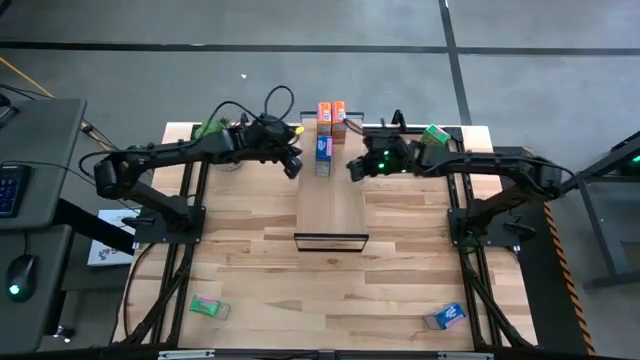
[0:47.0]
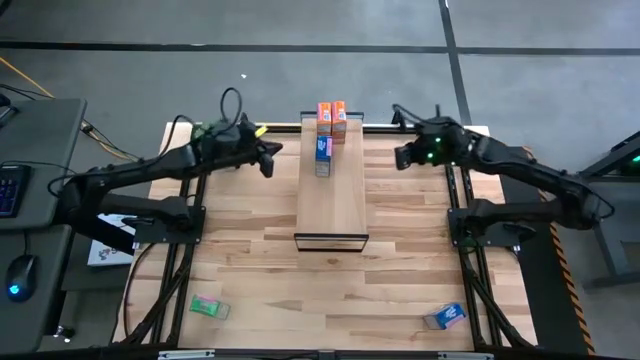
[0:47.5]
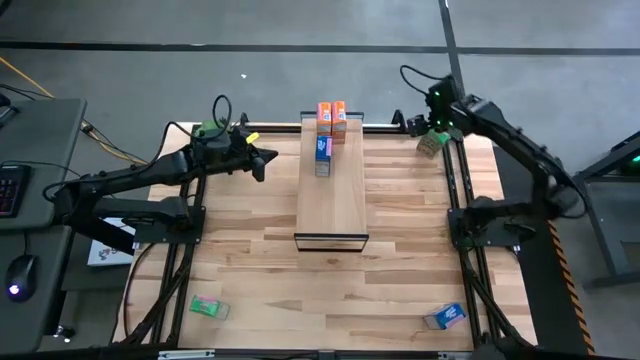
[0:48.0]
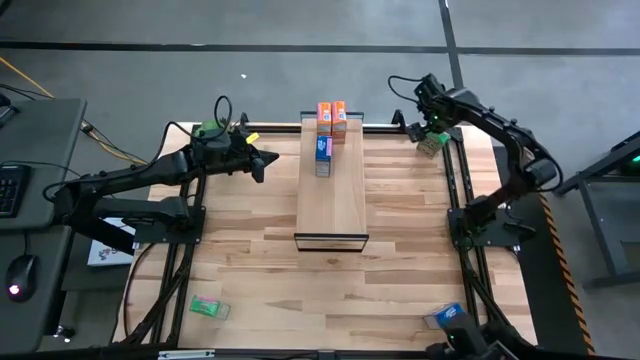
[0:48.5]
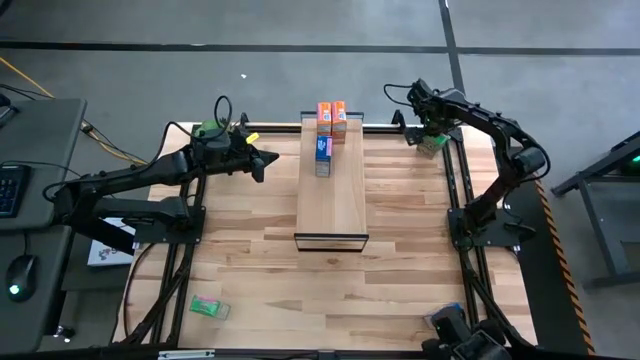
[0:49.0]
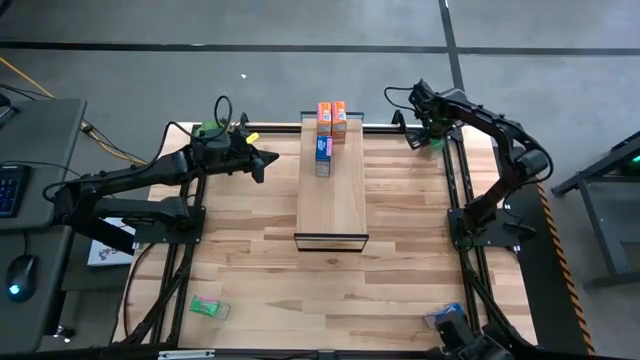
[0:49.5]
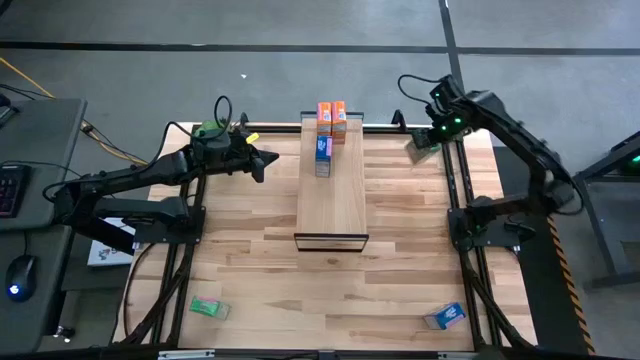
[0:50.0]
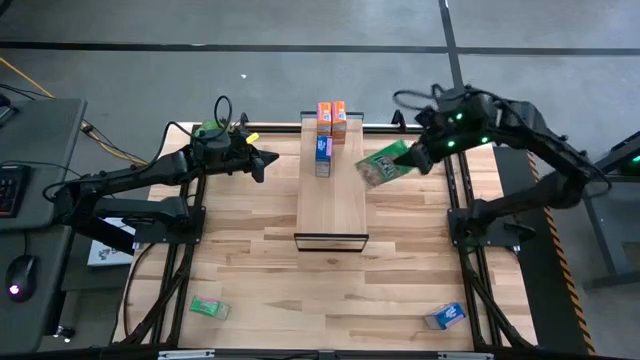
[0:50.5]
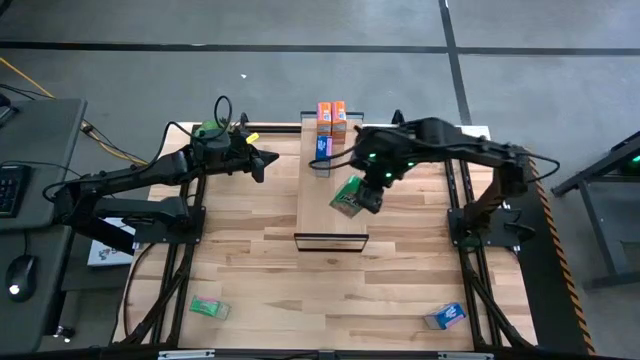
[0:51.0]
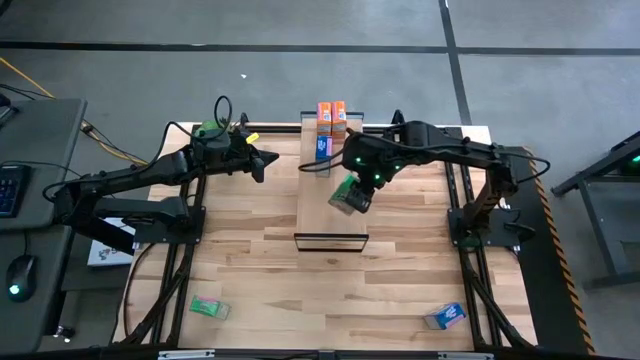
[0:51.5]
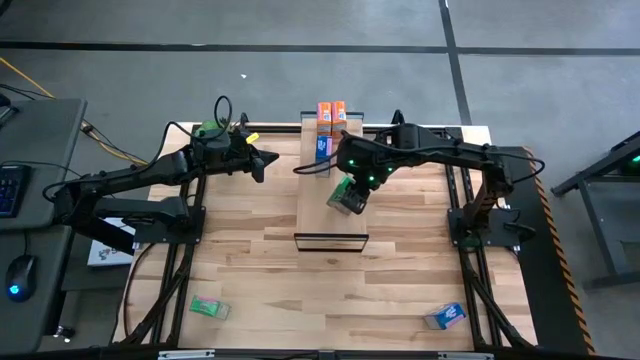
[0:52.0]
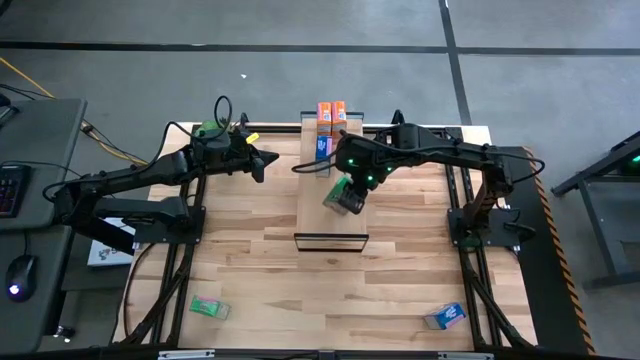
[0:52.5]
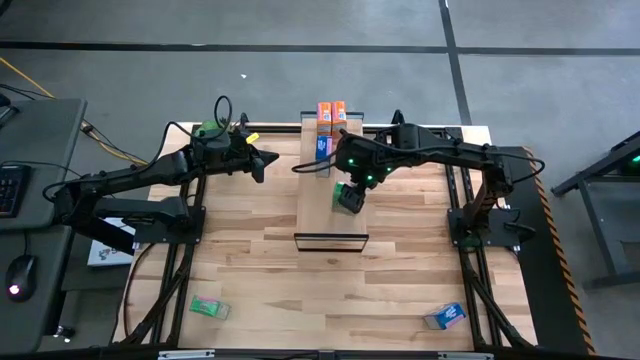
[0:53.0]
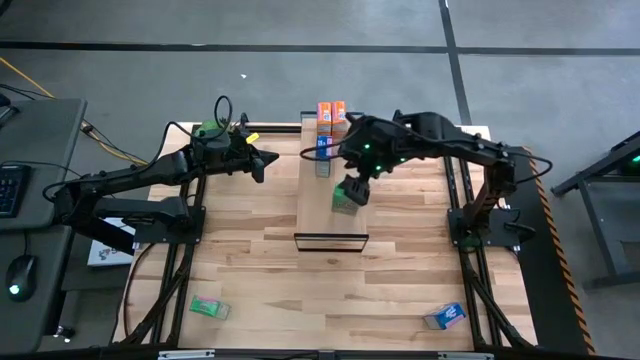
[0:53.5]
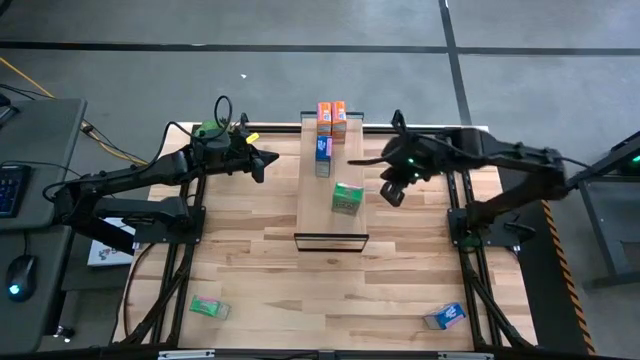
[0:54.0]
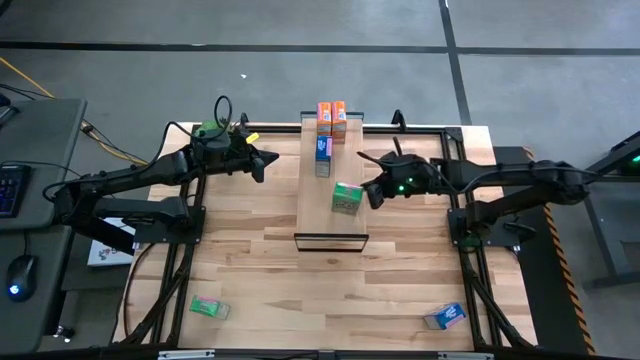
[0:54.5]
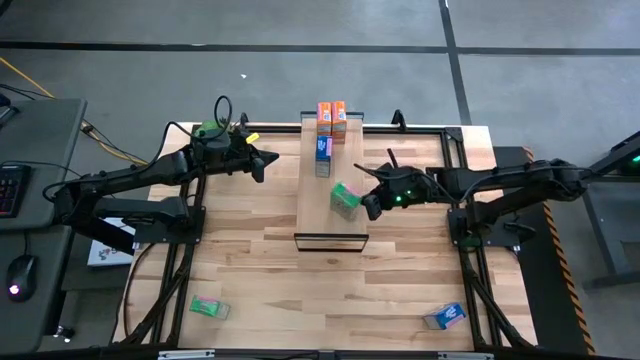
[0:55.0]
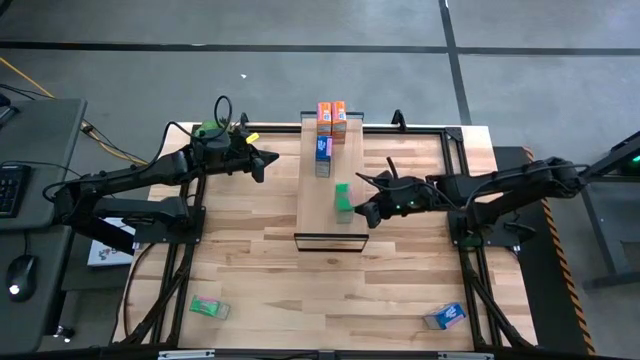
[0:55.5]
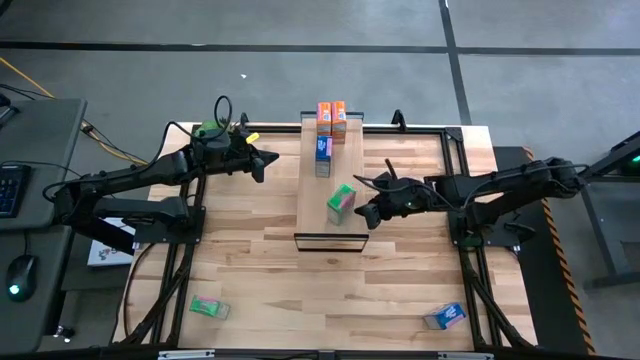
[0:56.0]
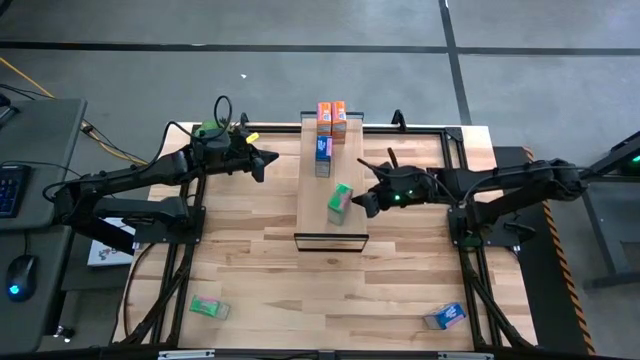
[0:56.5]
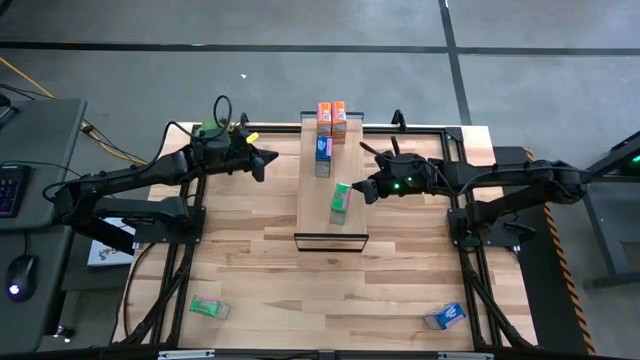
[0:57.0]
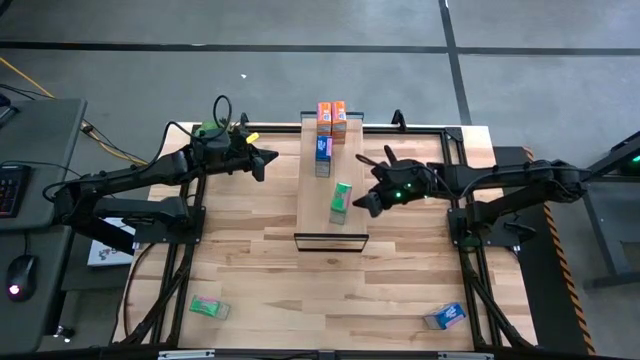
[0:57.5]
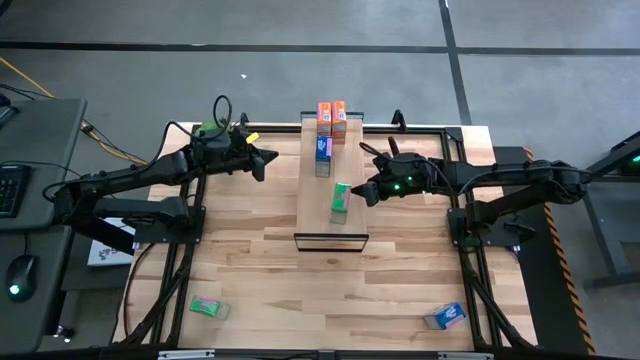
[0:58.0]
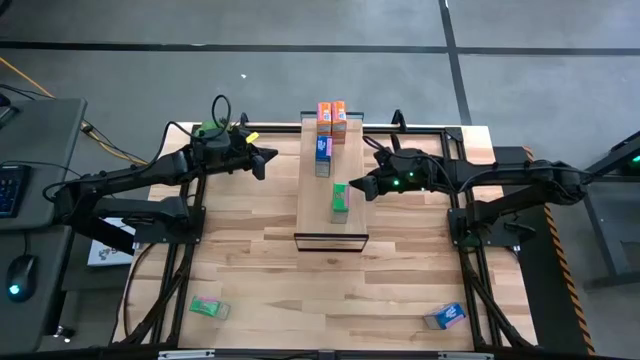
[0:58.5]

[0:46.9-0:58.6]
Task: Stack cereal on shelf
Put the top green cereal box on the shelf

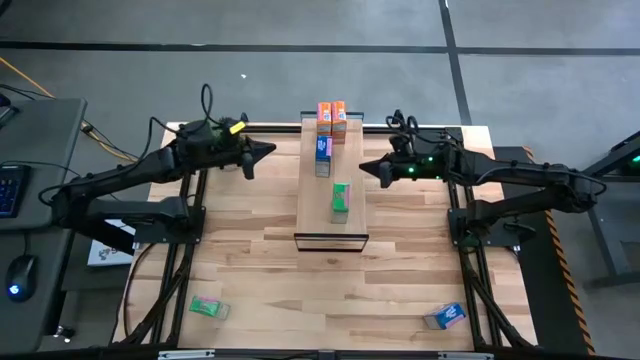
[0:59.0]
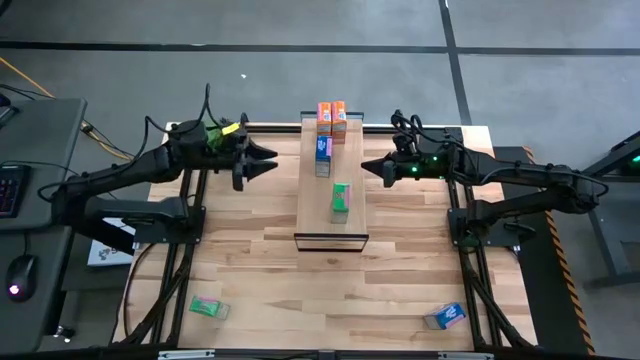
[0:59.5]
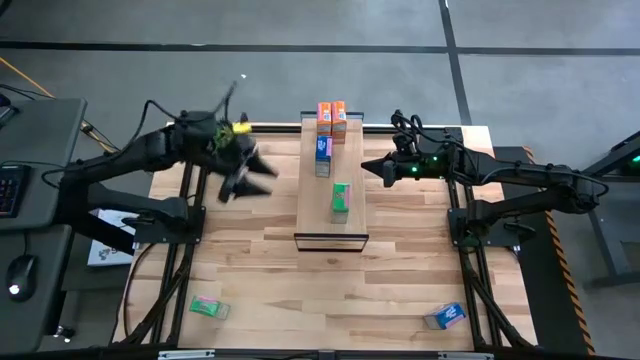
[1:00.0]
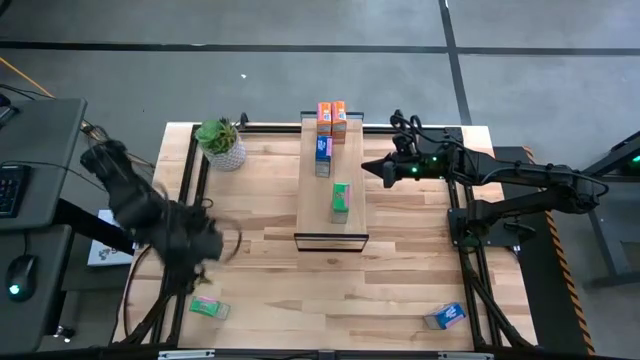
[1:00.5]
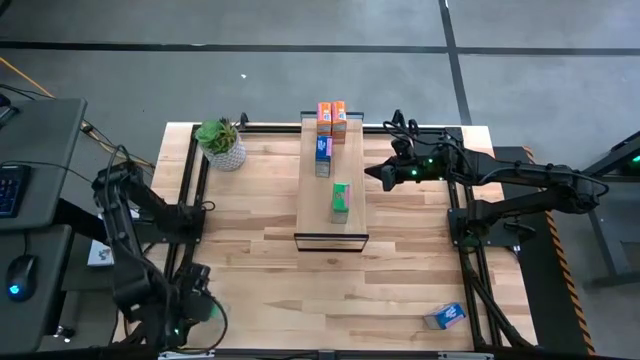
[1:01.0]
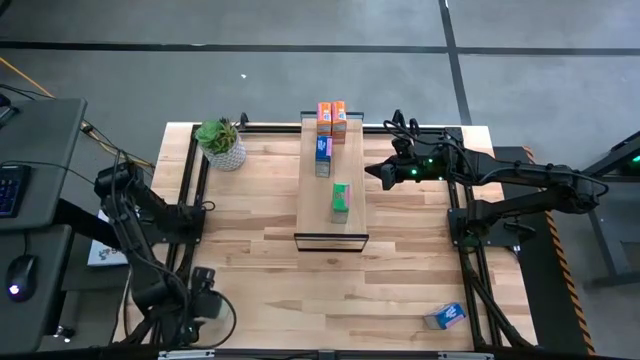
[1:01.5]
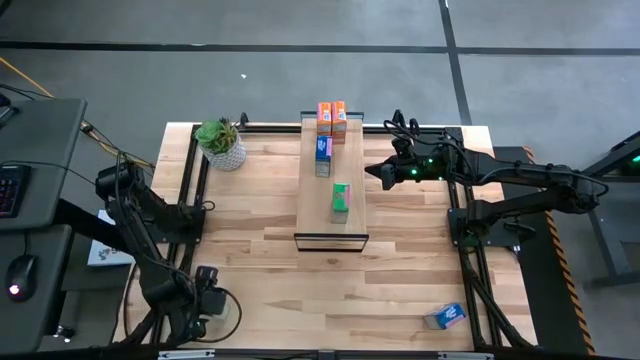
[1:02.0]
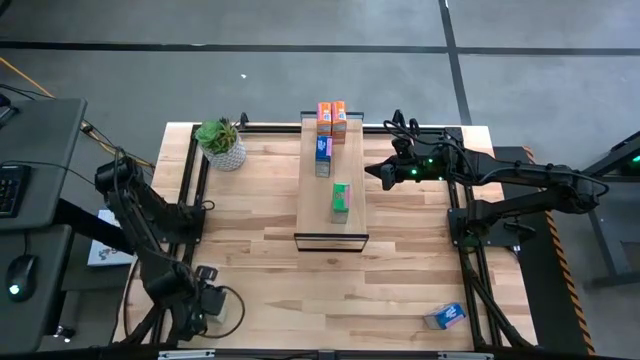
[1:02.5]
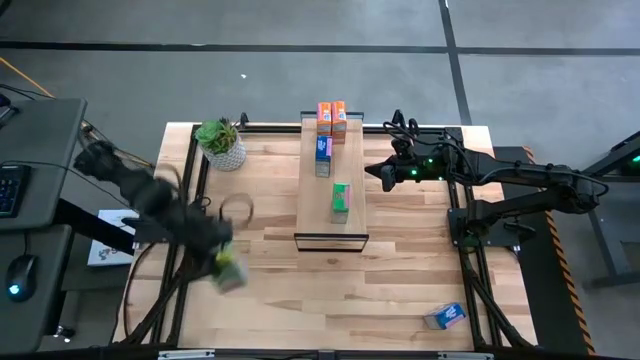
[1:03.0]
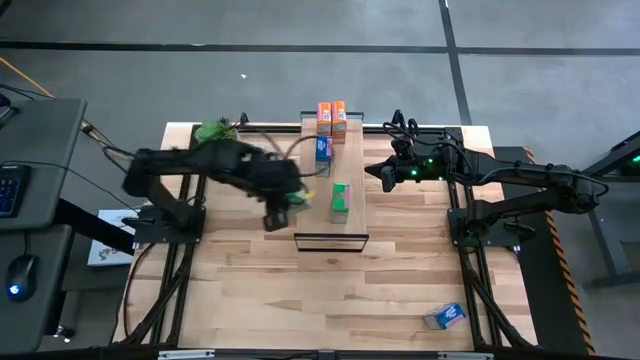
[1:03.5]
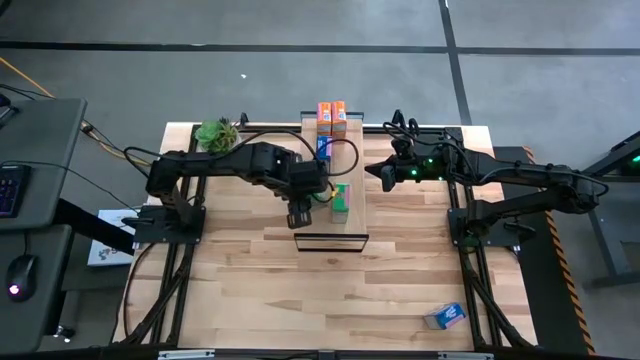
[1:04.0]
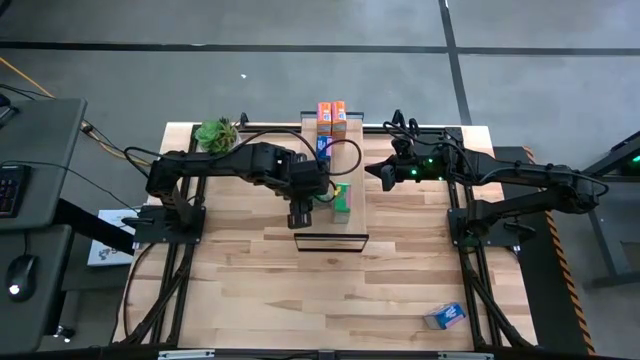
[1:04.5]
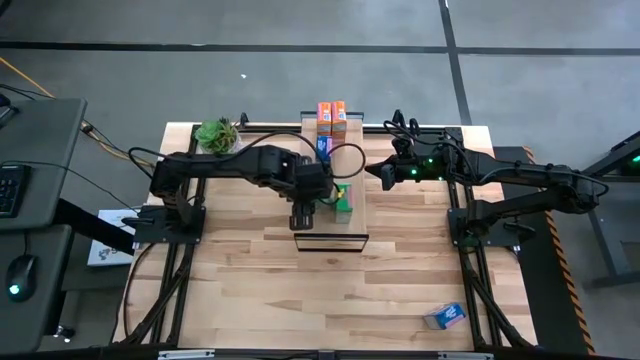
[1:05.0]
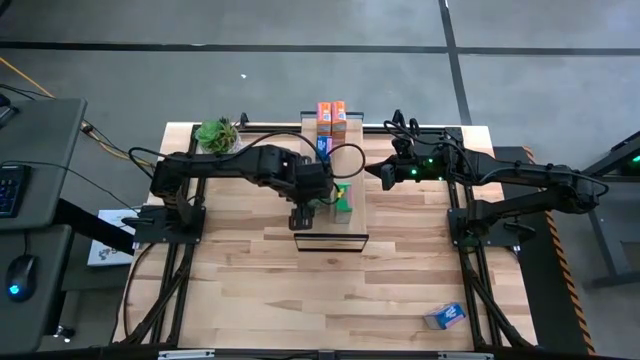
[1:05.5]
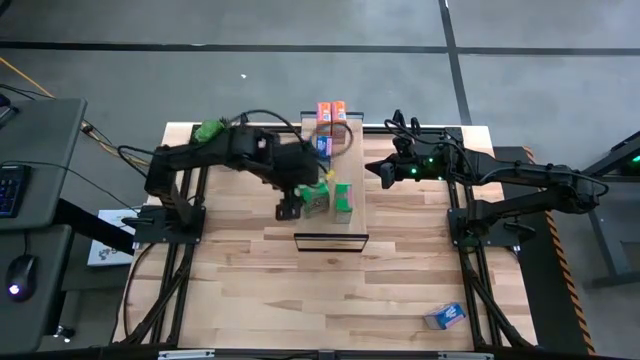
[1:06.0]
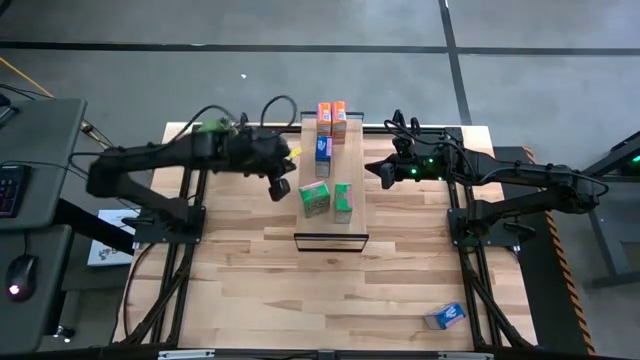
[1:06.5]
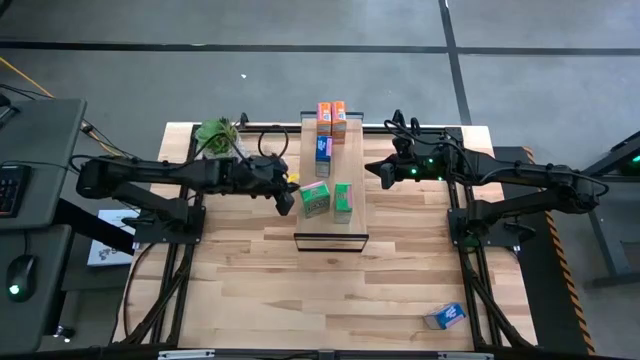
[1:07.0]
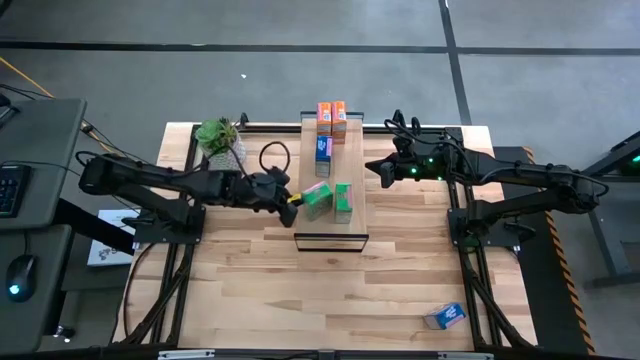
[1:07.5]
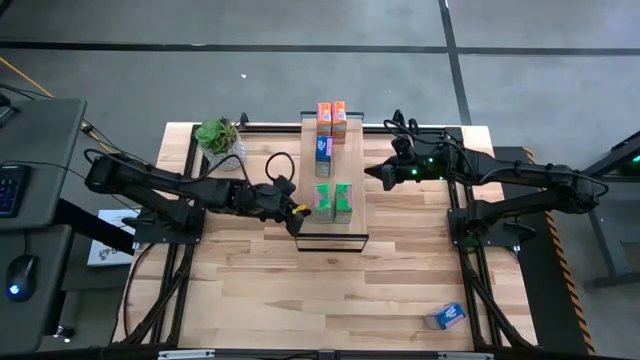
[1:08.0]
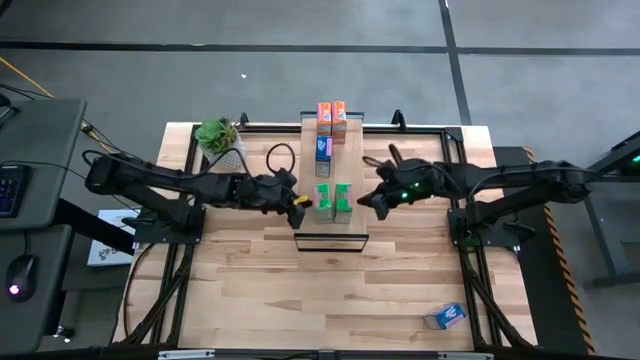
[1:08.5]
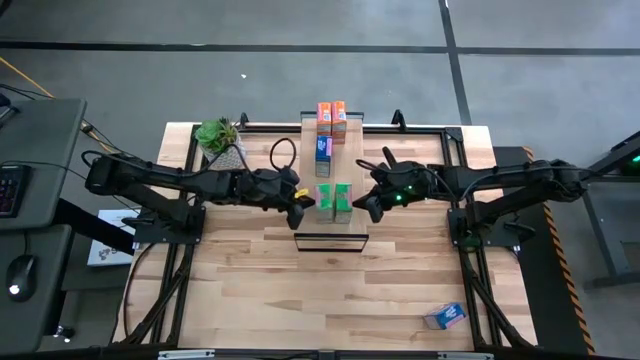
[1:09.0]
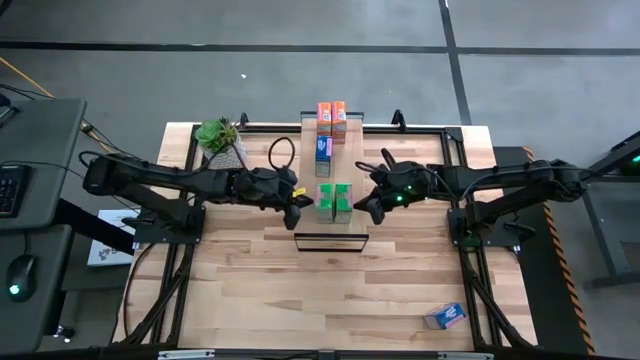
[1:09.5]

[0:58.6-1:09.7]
Put the green cereal box on the shelf aligned with the other green cereal box
